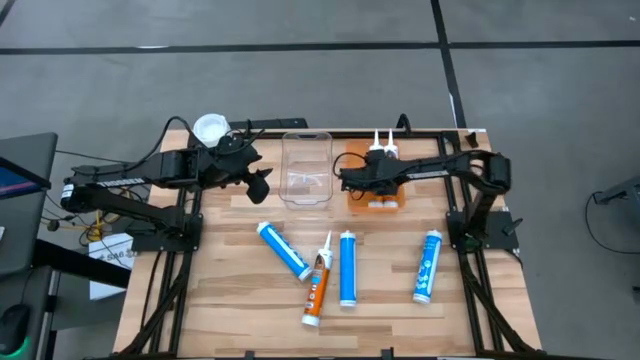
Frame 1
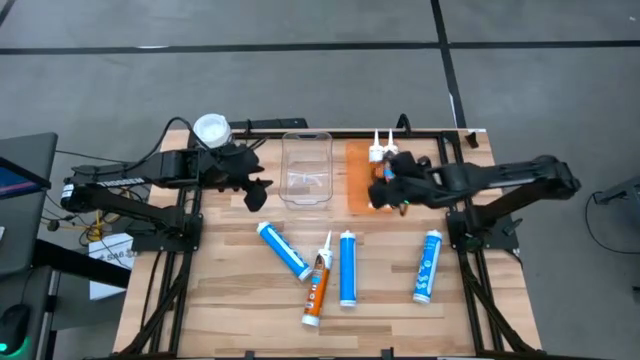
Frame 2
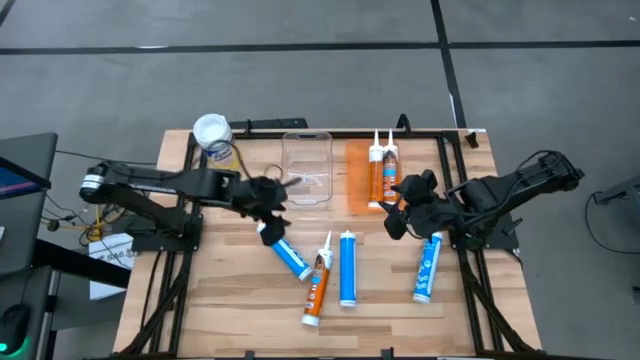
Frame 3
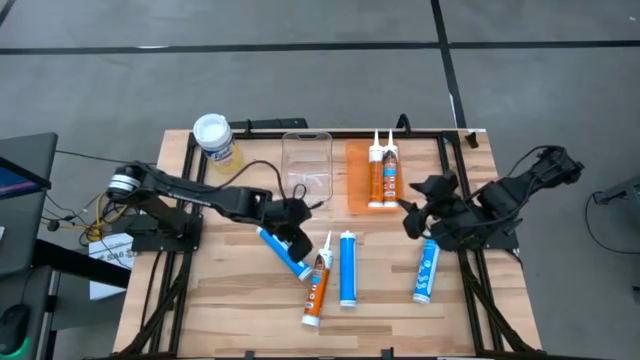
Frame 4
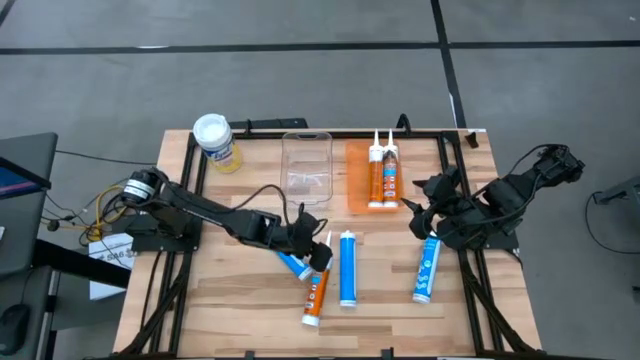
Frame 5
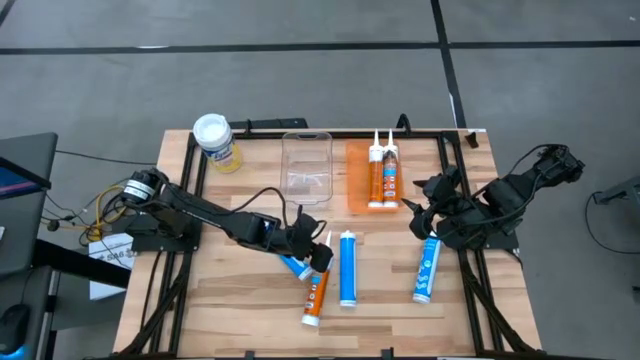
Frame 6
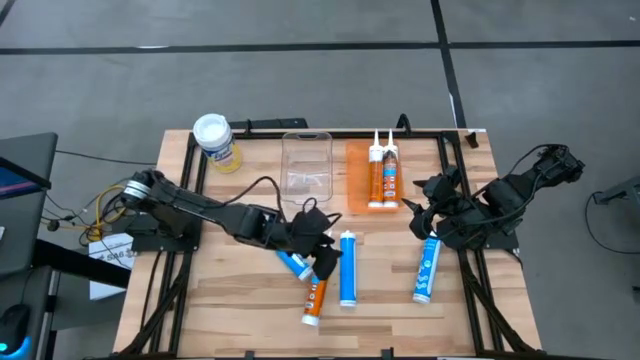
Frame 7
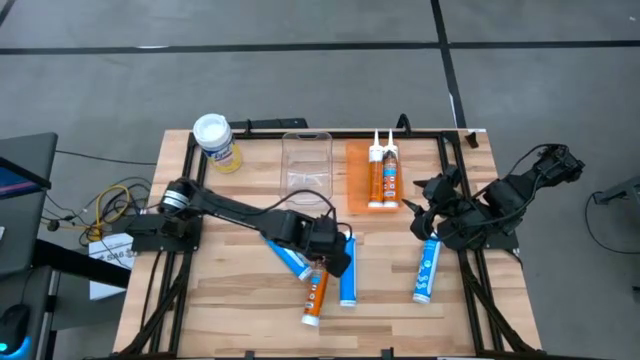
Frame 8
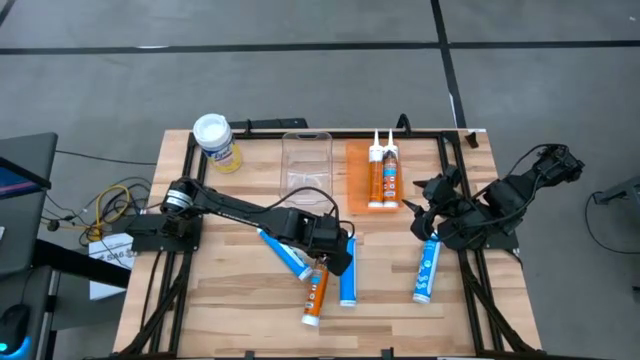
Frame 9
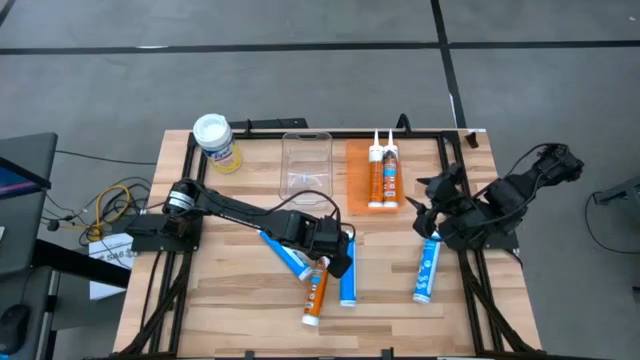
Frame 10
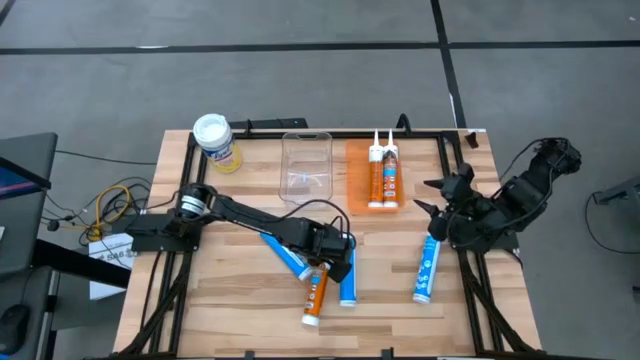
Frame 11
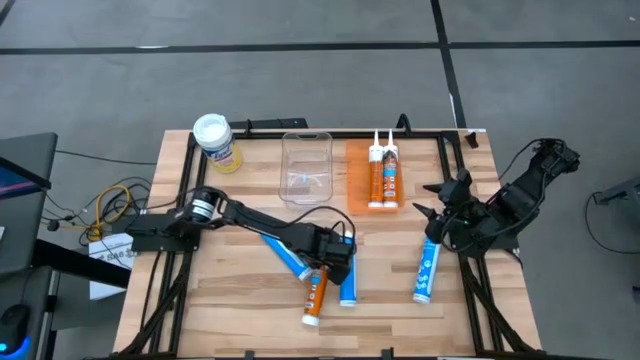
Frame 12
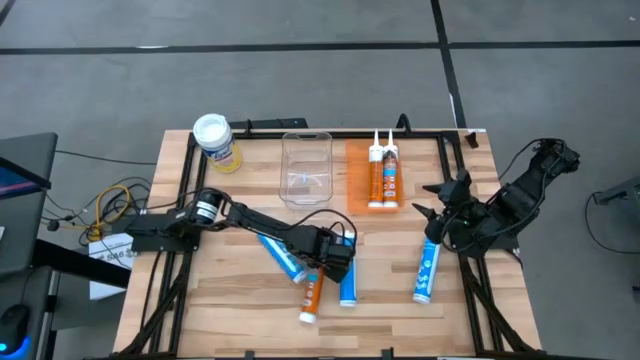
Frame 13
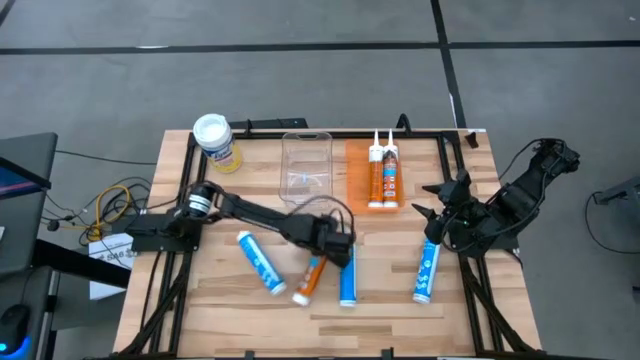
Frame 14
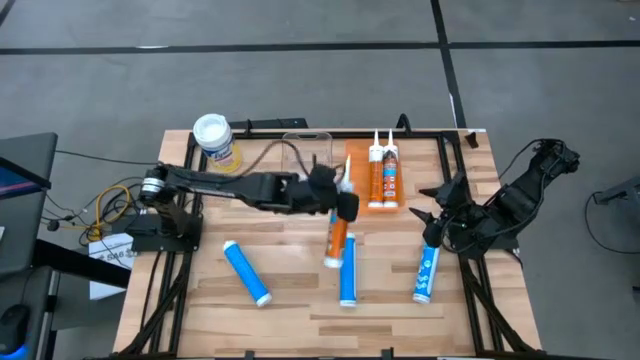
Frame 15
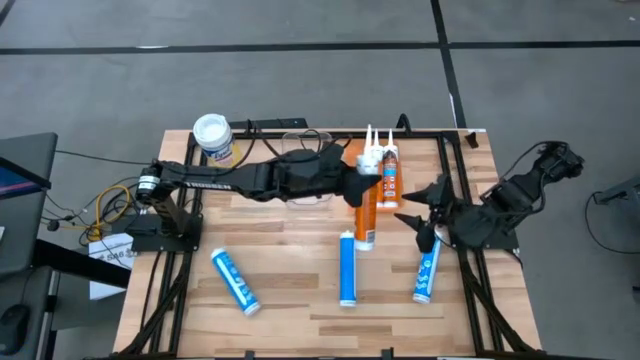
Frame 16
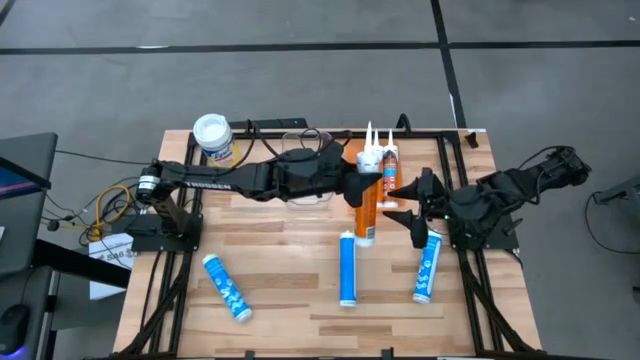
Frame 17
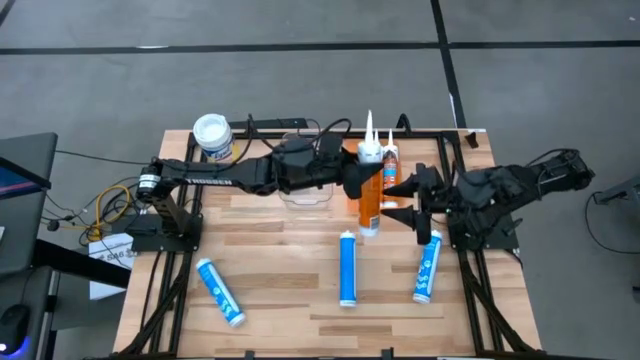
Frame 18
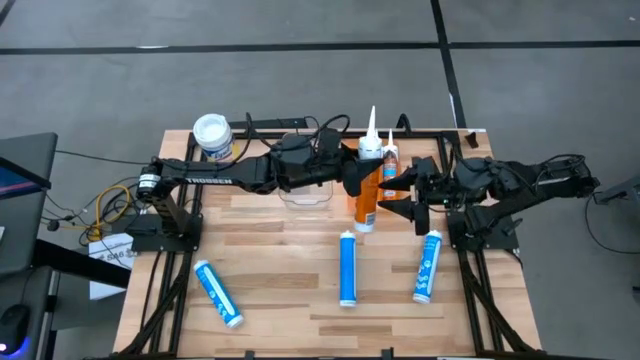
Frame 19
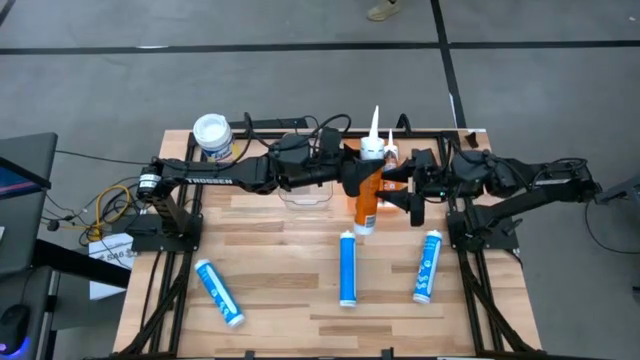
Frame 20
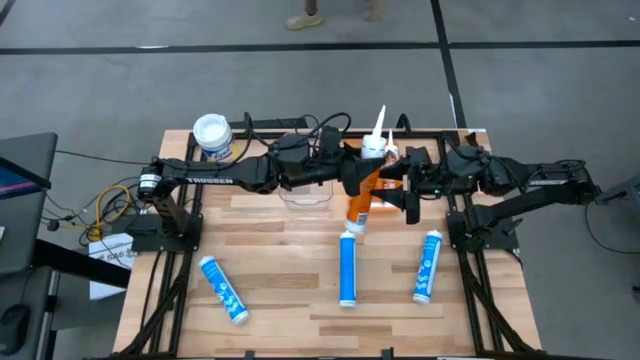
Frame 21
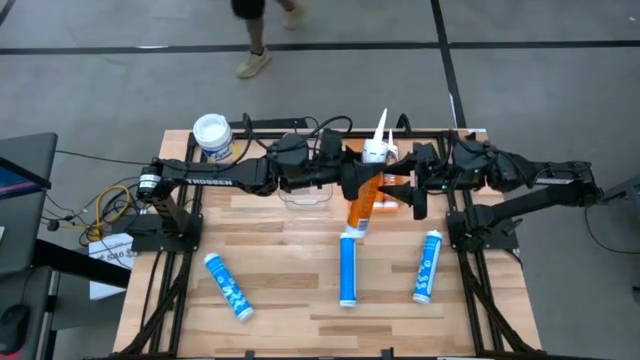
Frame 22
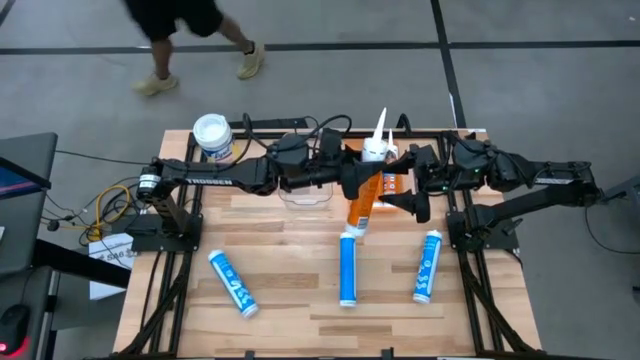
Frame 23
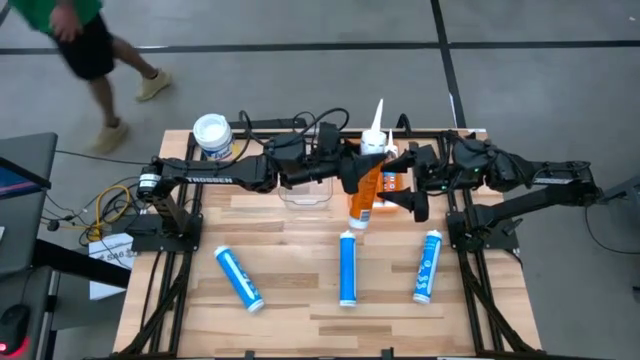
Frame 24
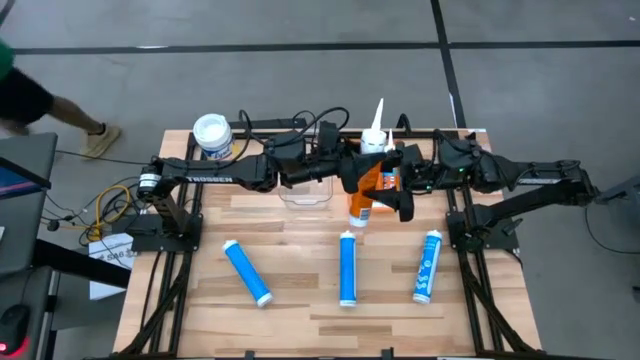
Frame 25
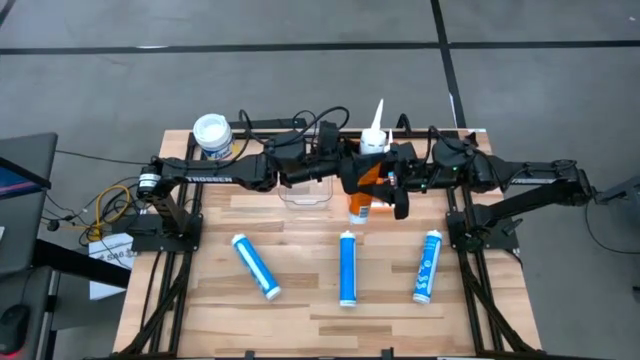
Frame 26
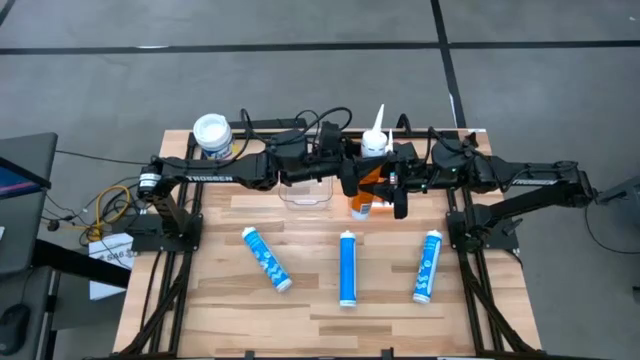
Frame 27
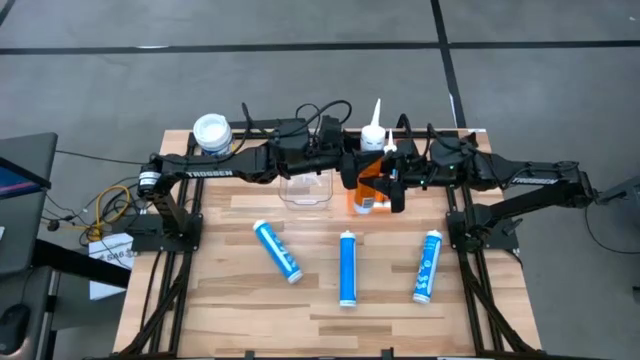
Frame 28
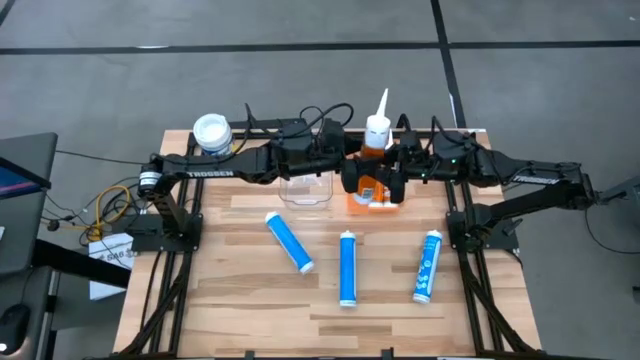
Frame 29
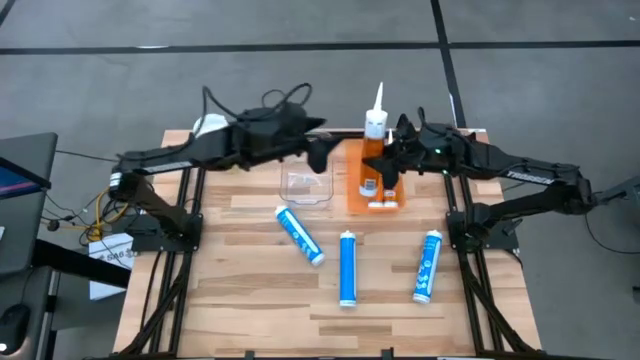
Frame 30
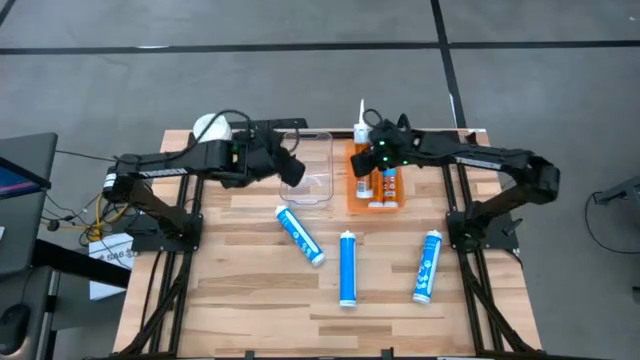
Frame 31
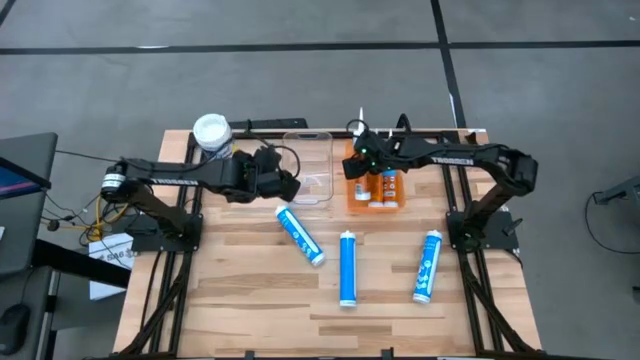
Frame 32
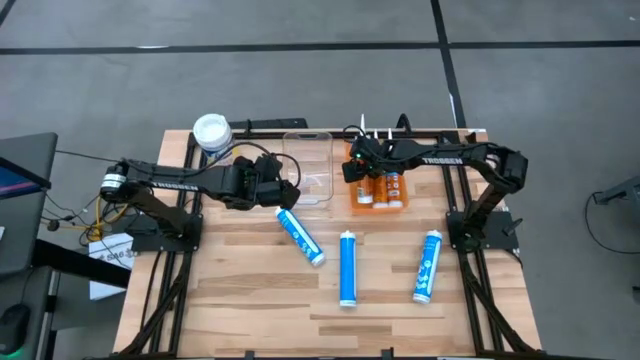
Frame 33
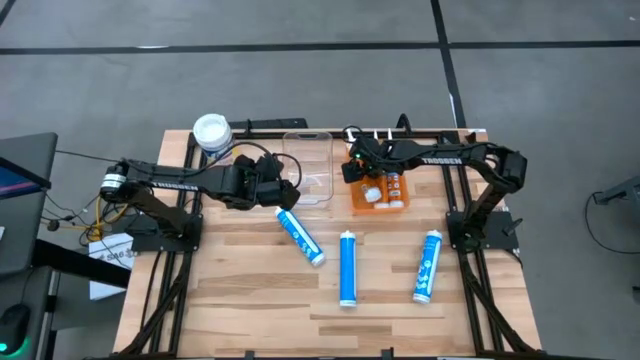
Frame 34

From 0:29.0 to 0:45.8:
Task: Pick & place silicon tubes, Sealant and Lysol wipes
Put the orange sealant into the orange bin

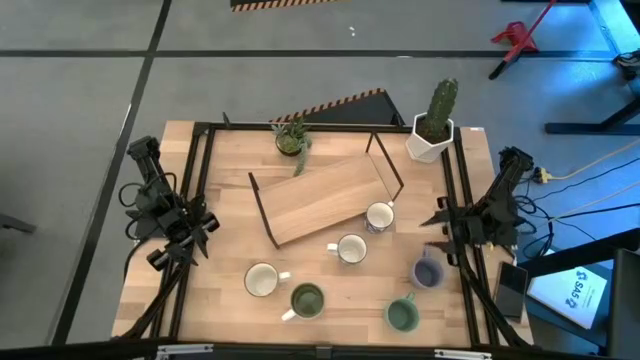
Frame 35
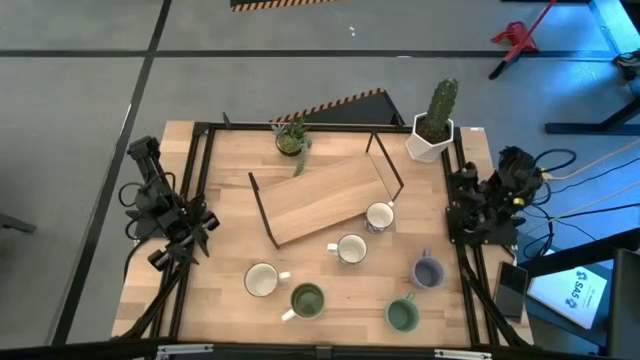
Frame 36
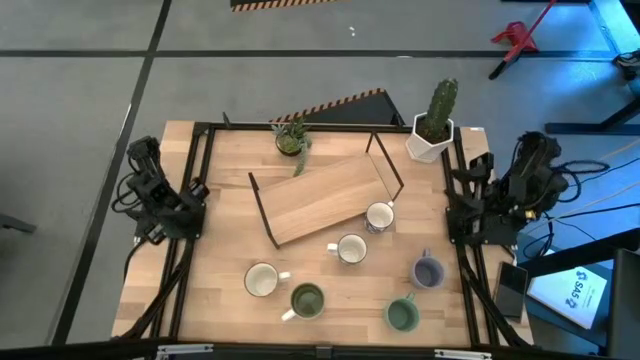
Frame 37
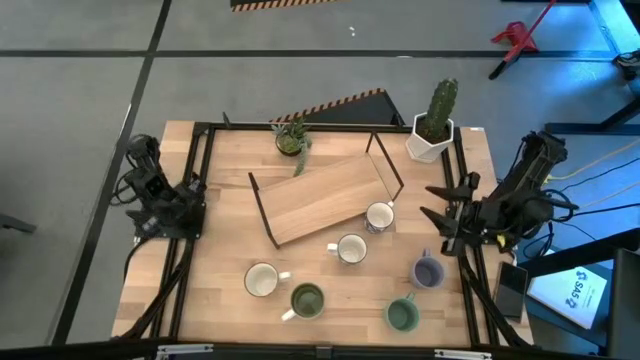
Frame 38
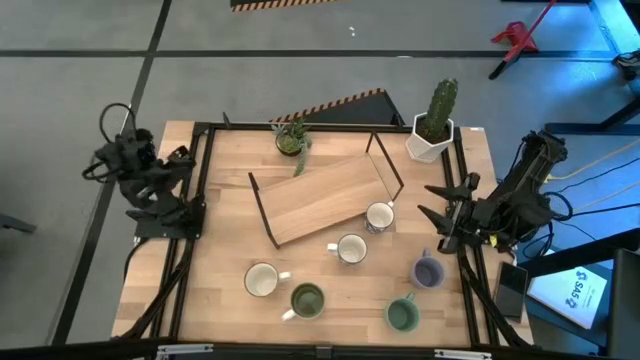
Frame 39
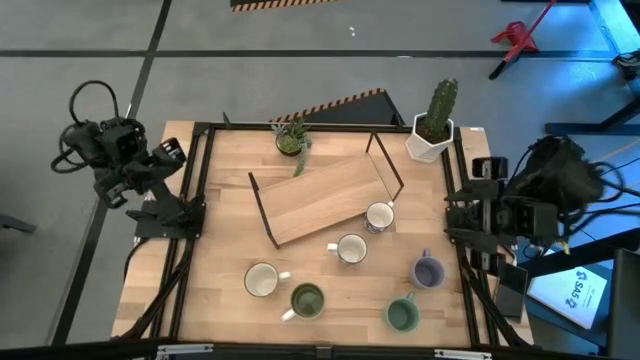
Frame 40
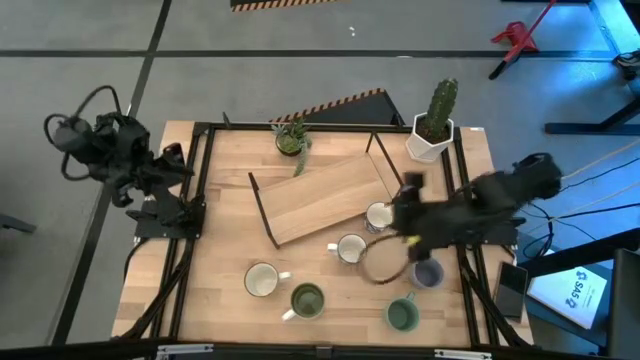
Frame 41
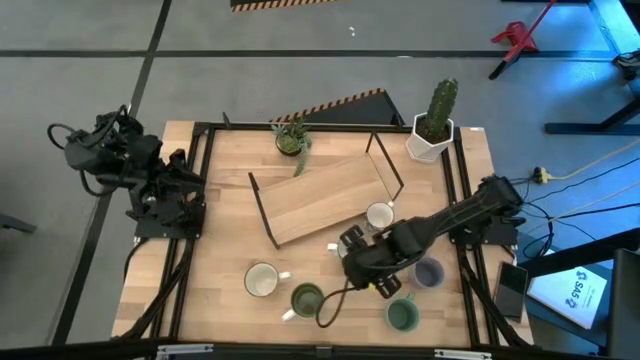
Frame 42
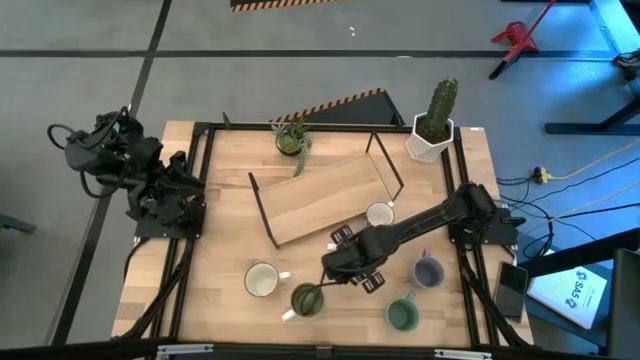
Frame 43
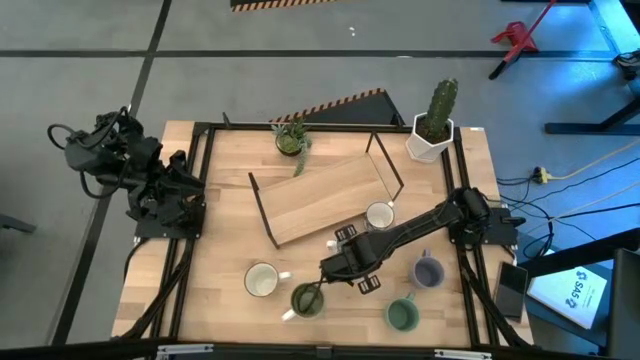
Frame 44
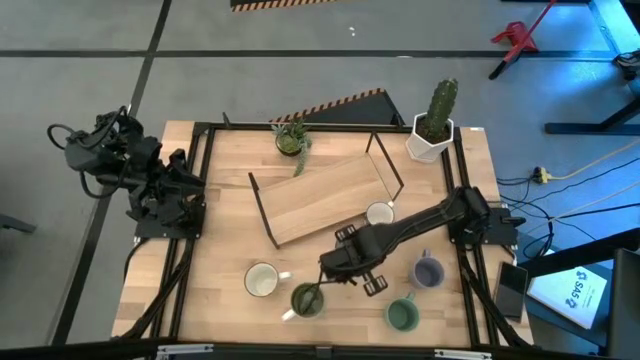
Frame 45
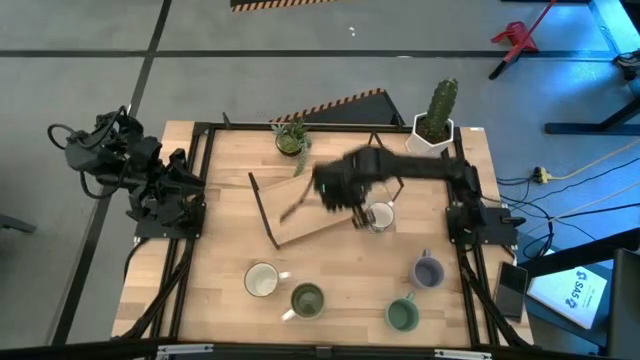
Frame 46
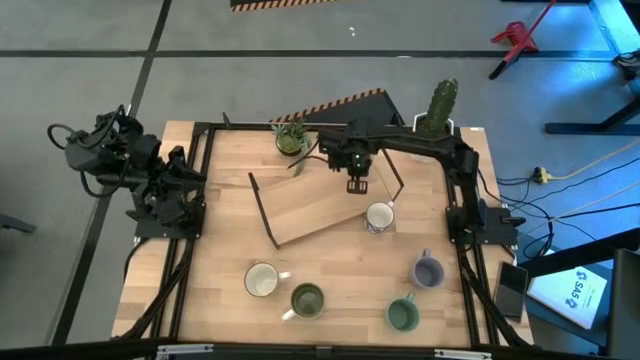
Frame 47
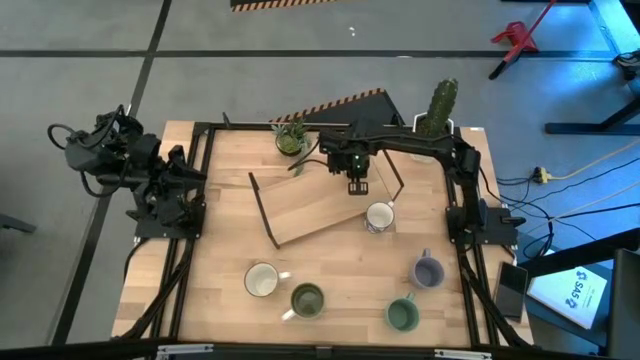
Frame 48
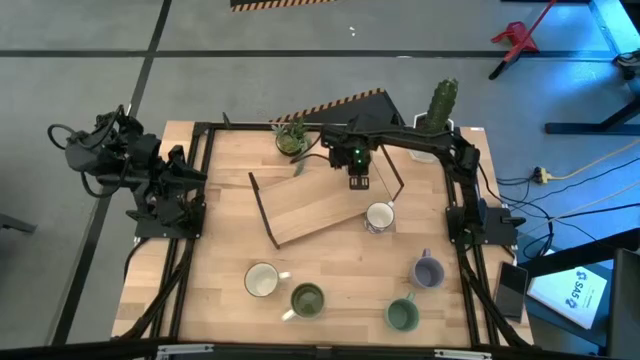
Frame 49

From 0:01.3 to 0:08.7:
Task: Place coffee mugs
Put the bottom blue patterned mug on the shelf
